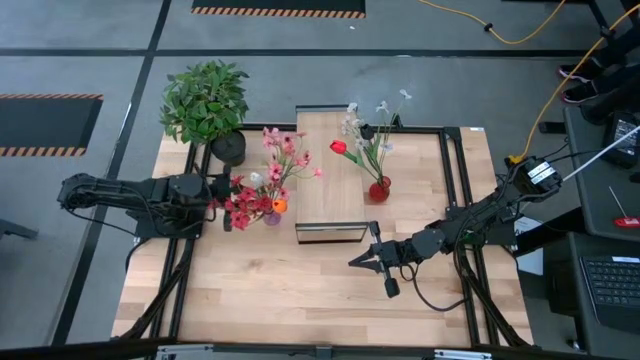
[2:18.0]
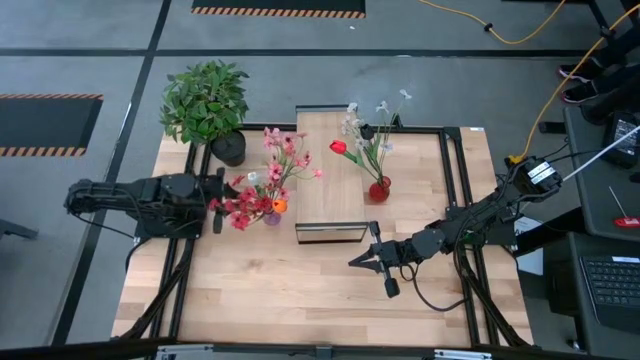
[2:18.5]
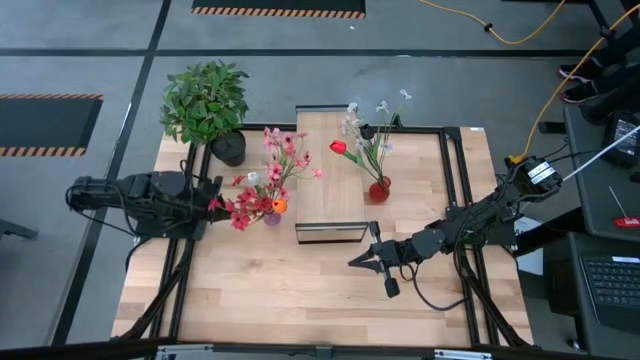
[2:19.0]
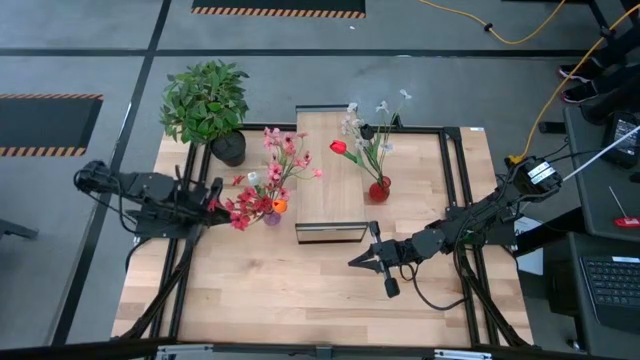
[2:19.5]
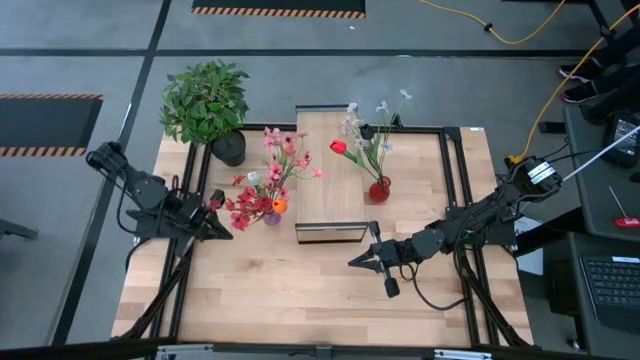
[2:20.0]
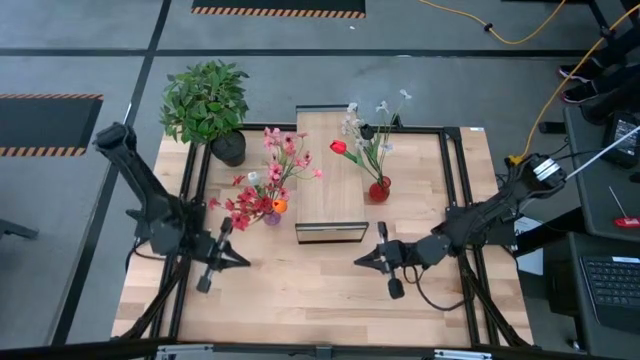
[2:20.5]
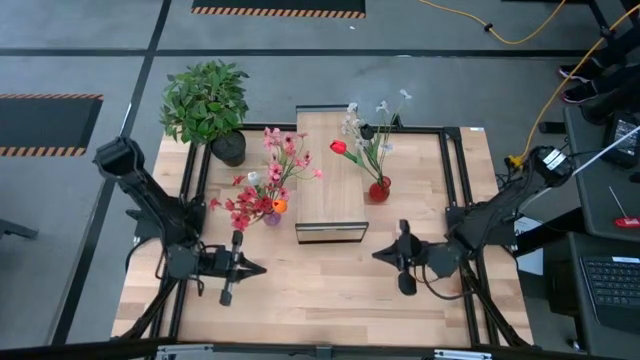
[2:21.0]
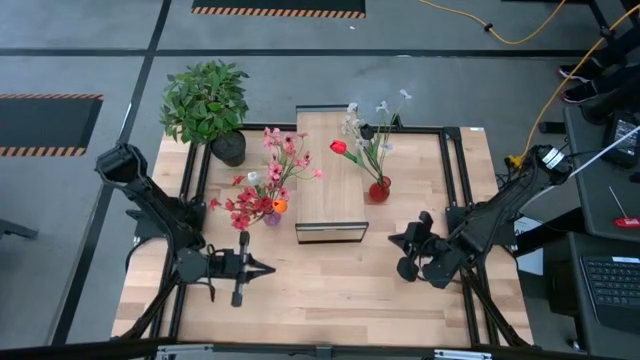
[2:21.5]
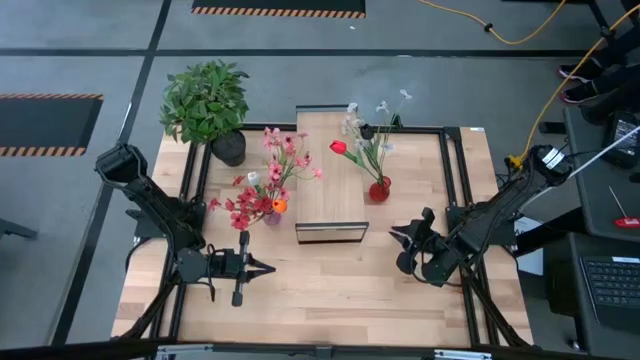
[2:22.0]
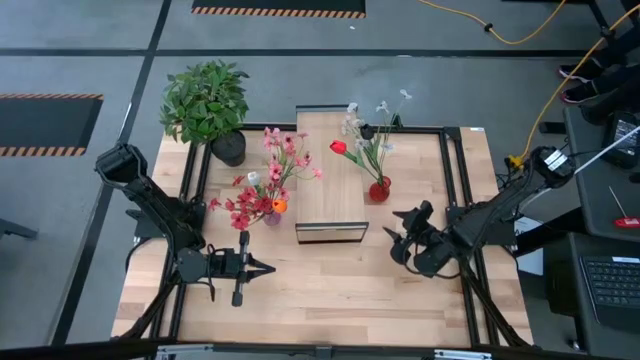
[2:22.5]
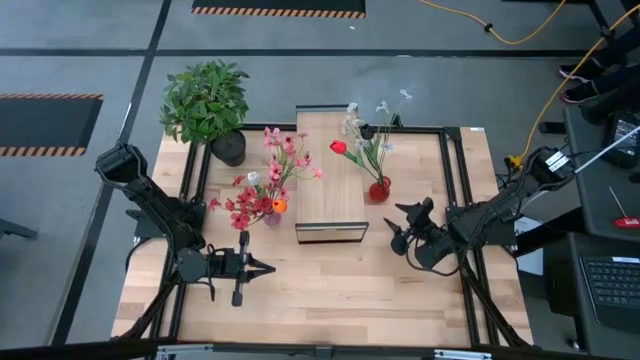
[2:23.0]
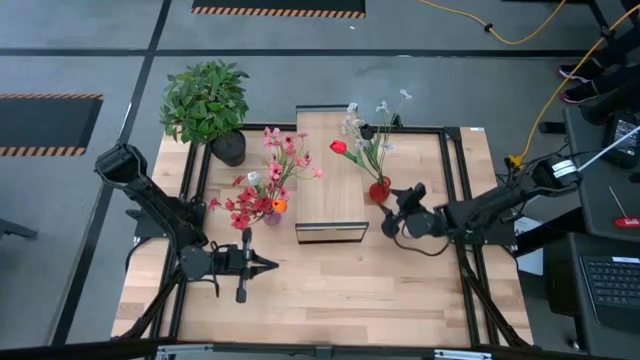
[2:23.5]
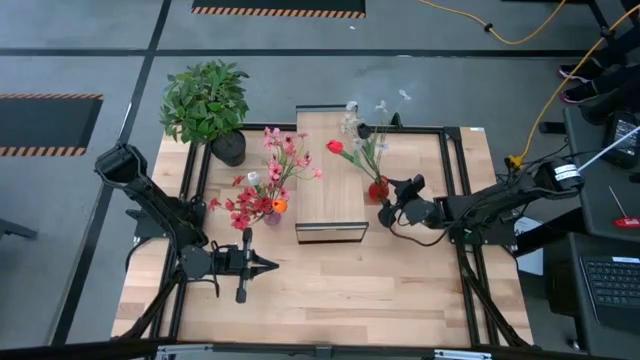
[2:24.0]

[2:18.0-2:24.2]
Task: Pick and place flowers into a vace then onto a shelf
Put the red vase on the shelf

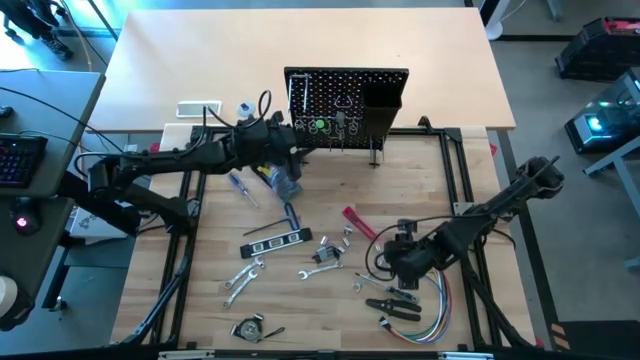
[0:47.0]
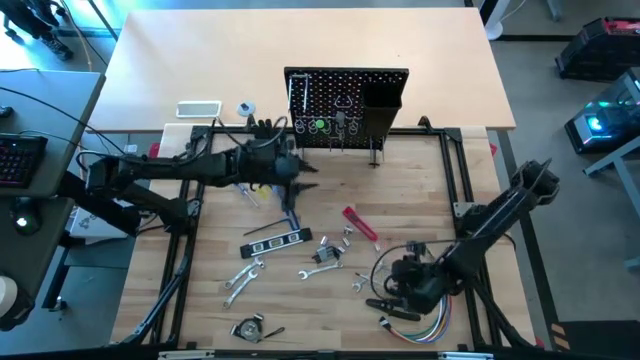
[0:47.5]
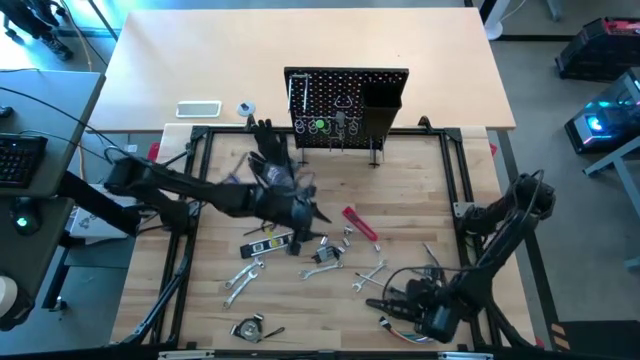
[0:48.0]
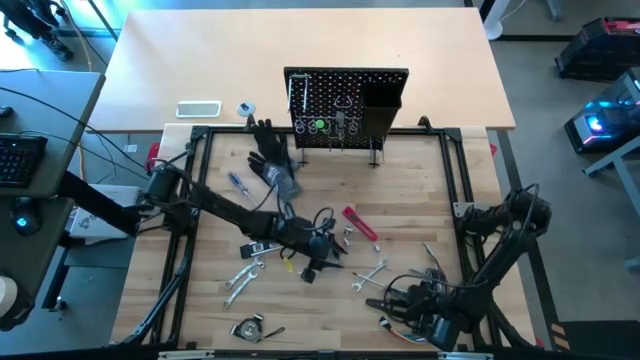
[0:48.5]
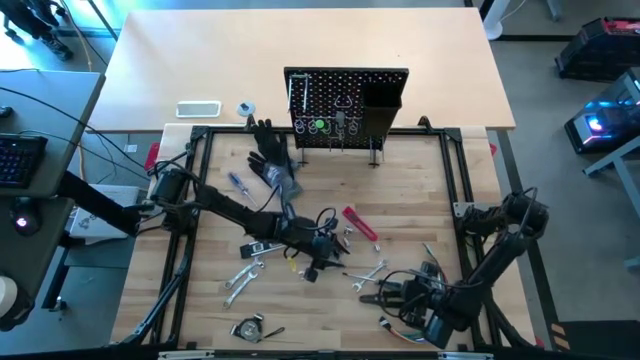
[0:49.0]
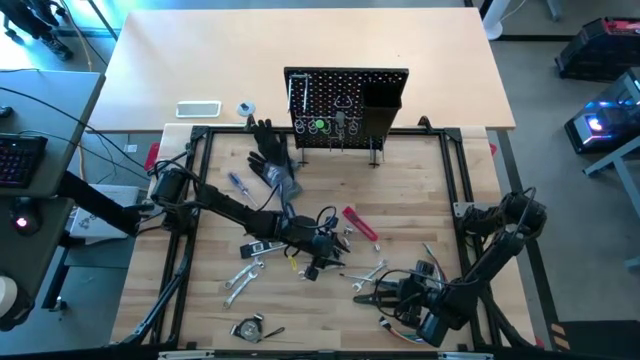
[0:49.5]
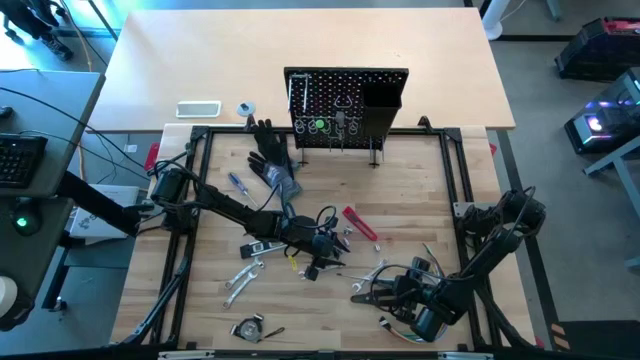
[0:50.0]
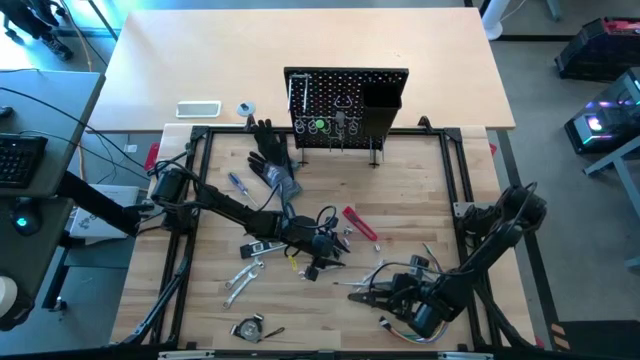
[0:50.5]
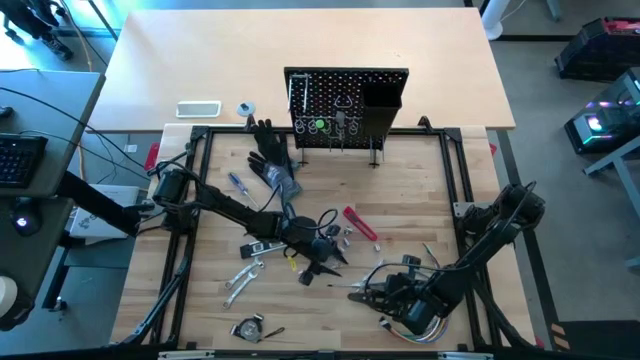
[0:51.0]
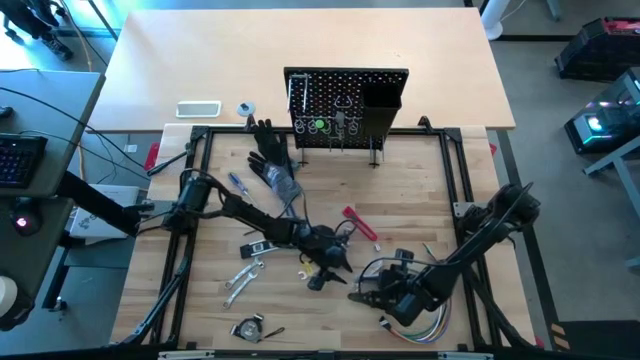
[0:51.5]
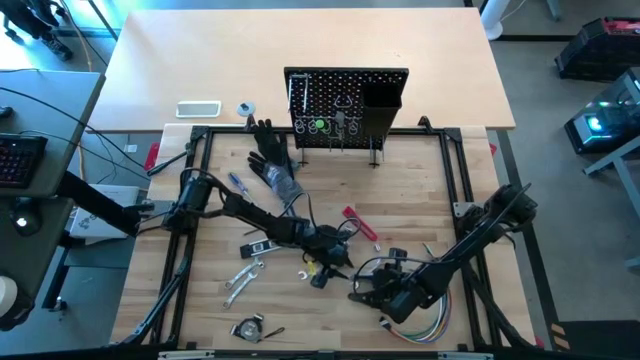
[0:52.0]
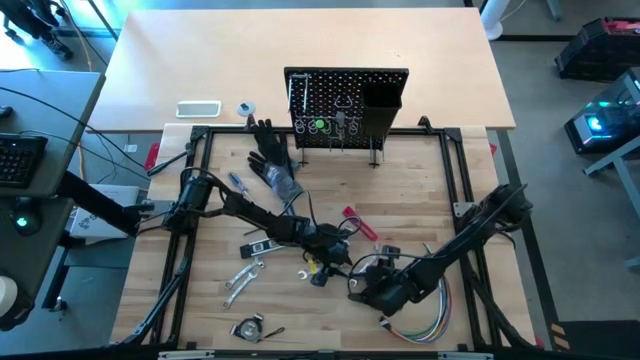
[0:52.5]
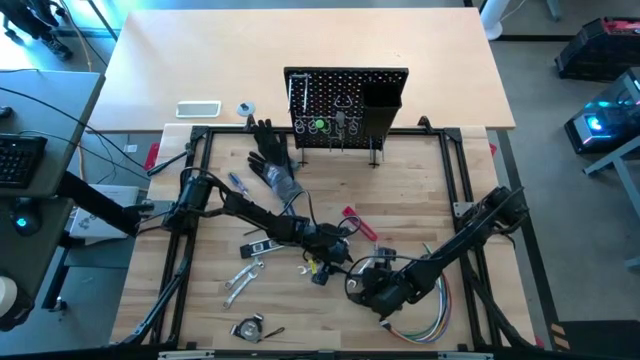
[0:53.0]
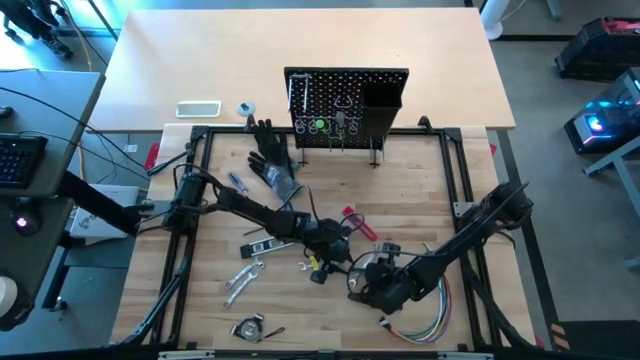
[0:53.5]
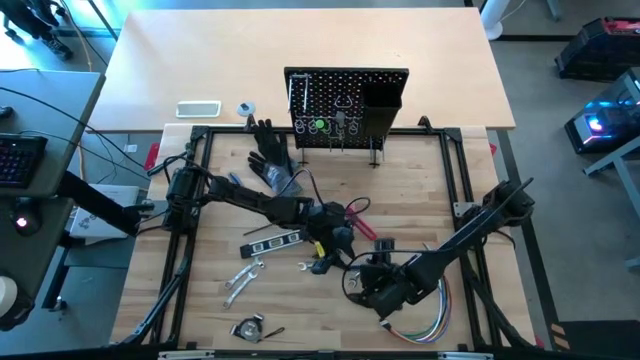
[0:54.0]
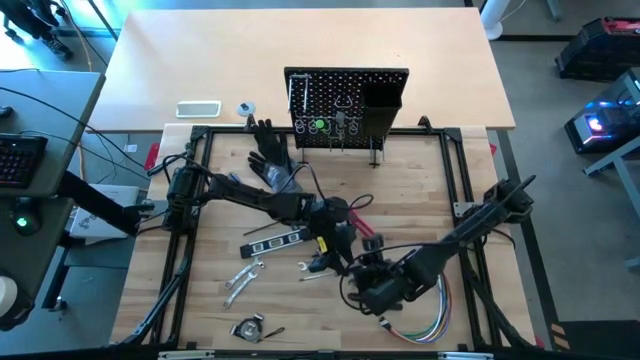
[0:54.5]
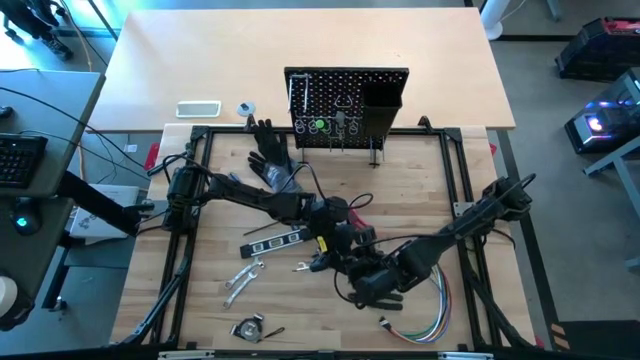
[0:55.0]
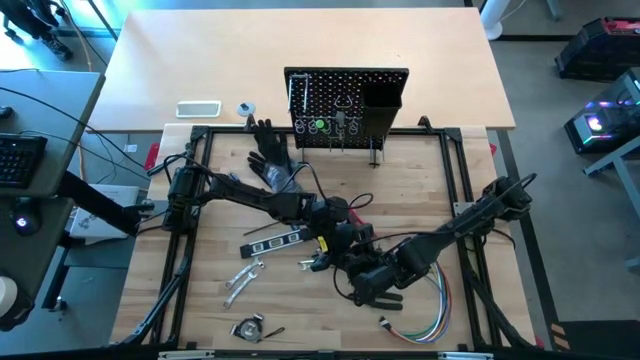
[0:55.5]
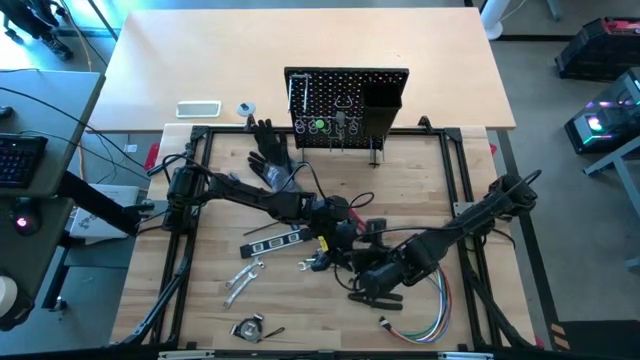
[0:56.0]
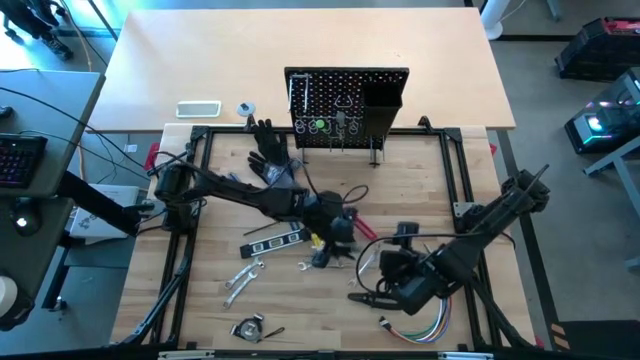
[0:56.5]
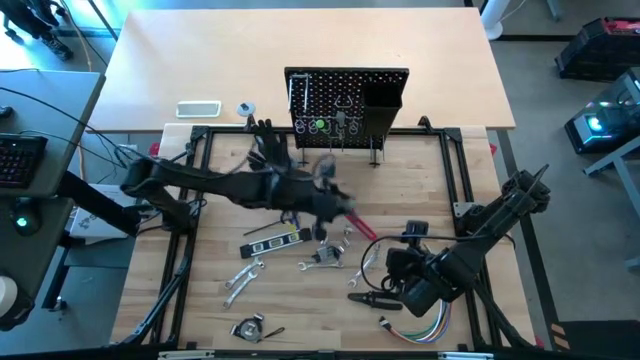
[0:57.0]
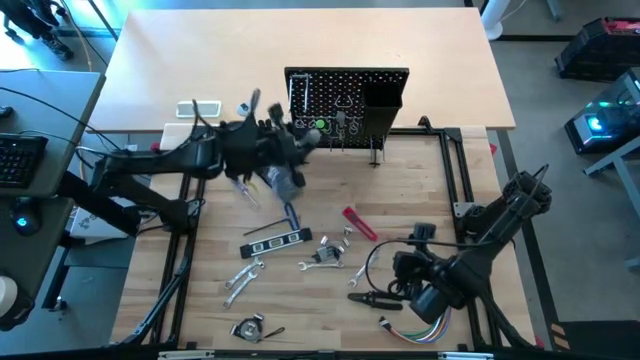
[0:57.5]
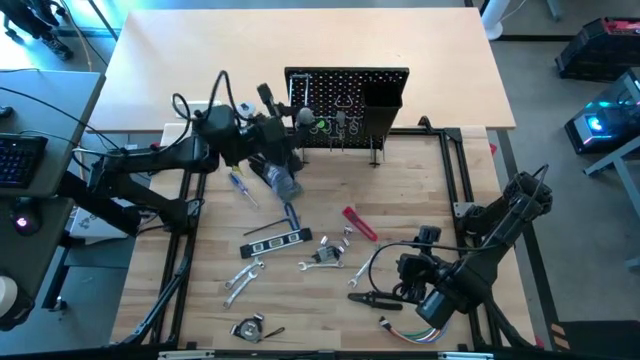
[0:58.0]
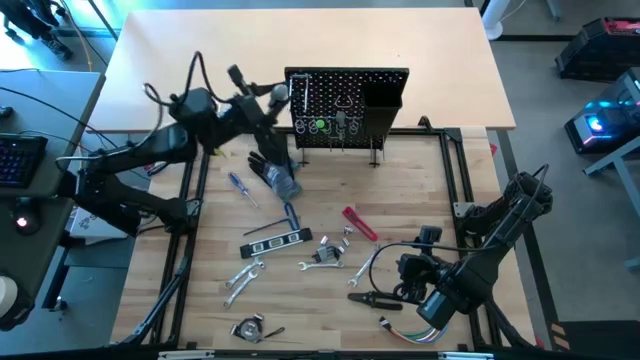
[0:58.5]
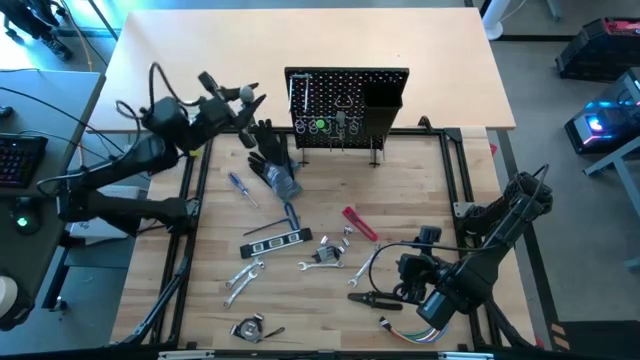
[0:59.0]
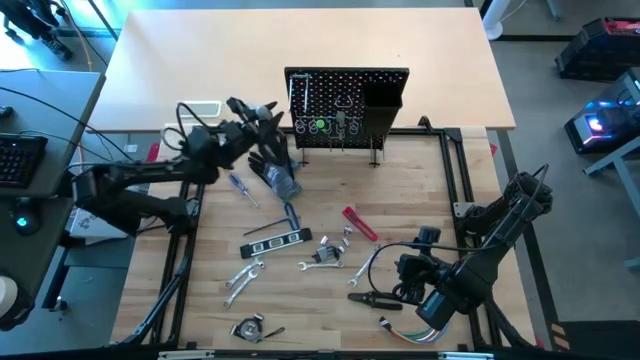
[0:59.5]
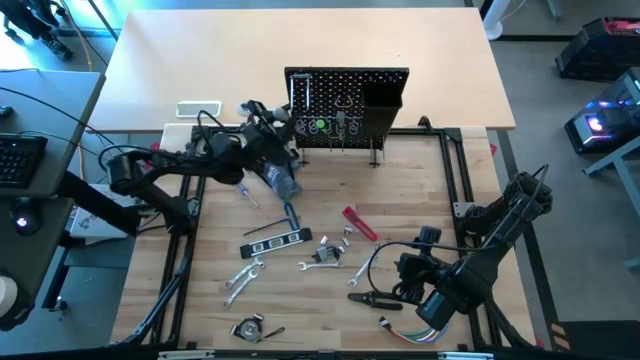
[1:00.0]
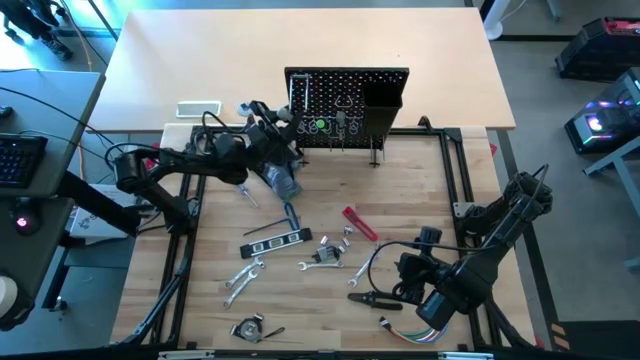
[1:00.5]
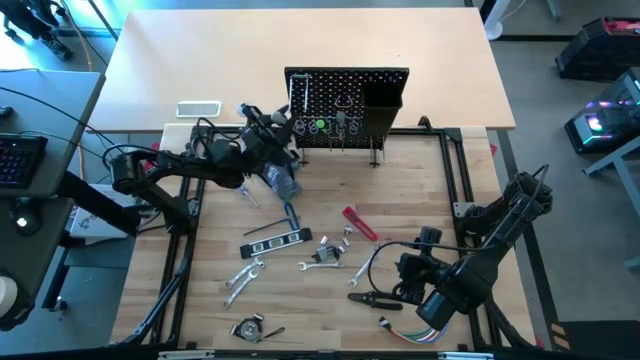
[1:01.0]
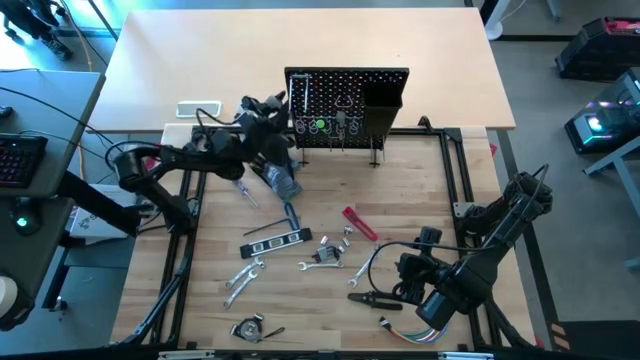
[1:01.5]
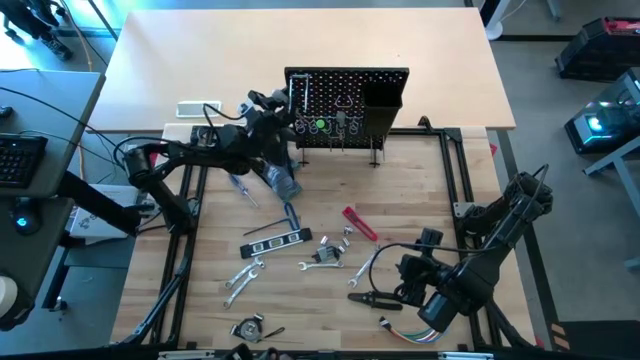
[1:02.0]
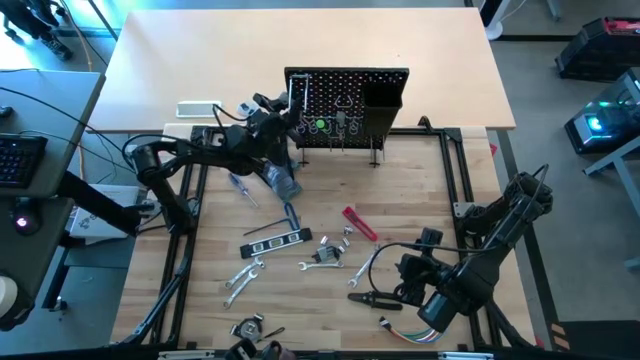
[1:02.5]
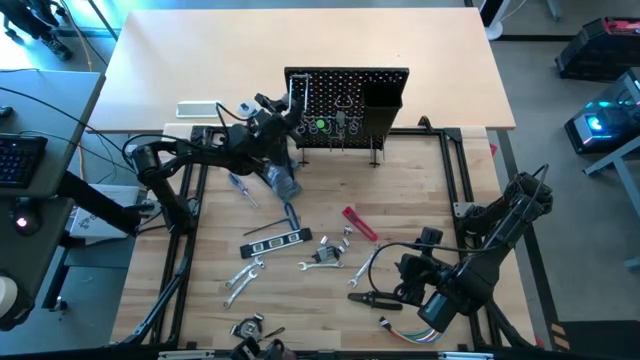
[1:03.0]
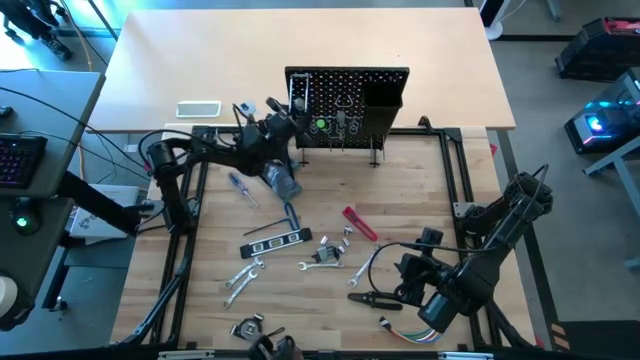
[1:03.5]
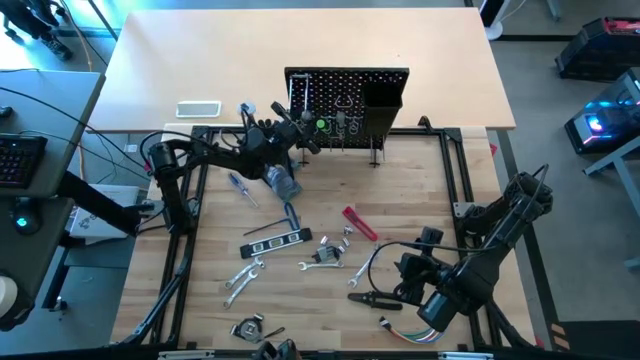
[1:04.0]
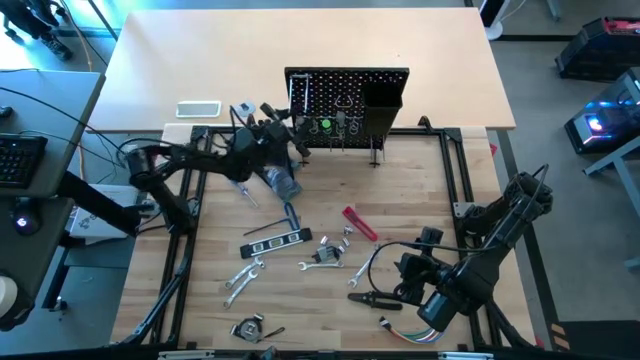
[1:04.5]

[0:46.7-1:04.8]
Task: Hang tools onto peg board
Hang the gray screwdriver on the pegboard
